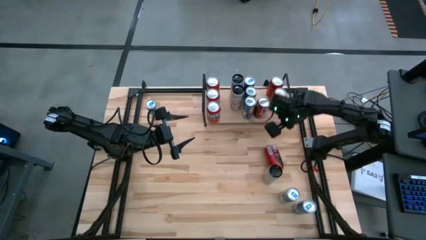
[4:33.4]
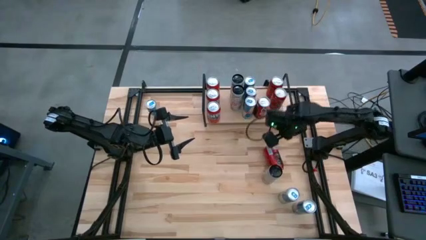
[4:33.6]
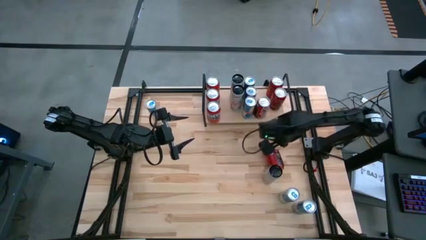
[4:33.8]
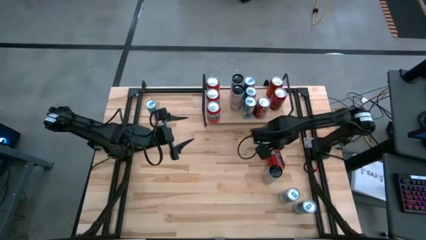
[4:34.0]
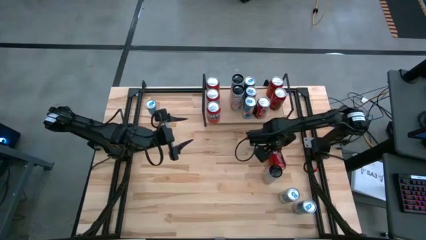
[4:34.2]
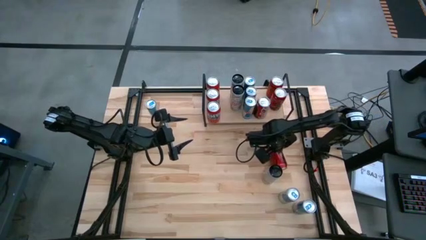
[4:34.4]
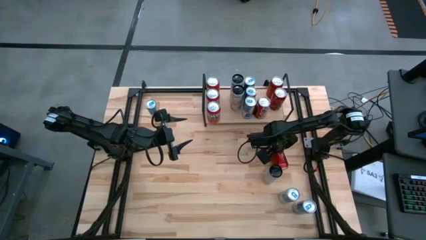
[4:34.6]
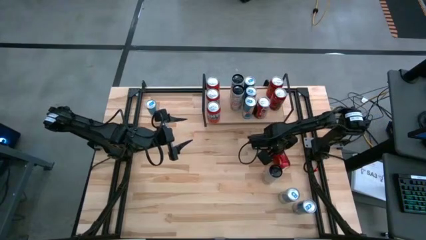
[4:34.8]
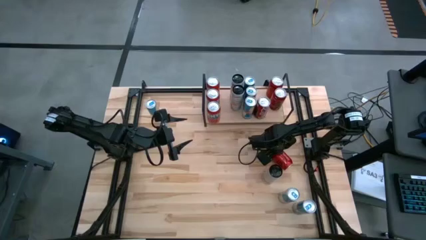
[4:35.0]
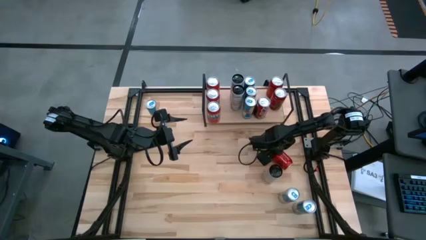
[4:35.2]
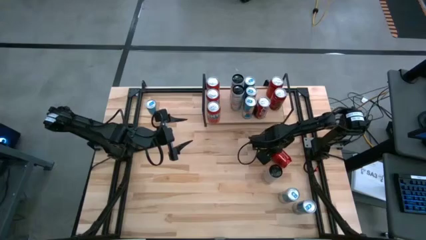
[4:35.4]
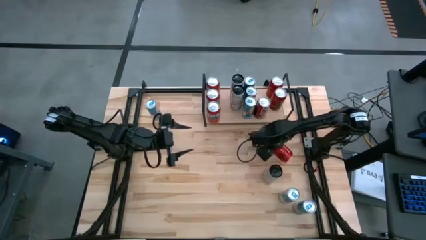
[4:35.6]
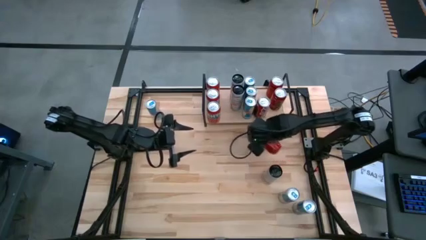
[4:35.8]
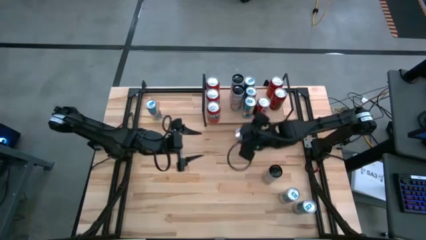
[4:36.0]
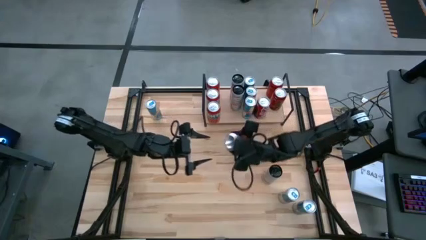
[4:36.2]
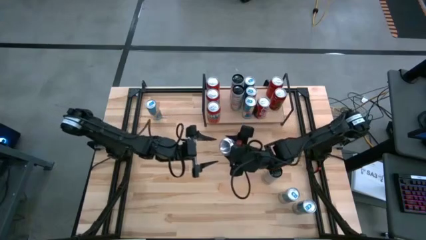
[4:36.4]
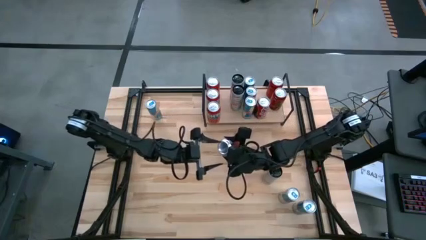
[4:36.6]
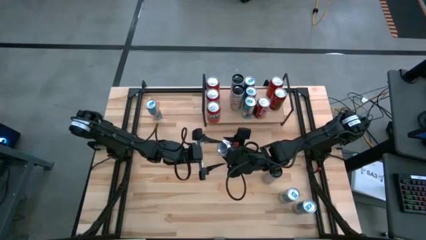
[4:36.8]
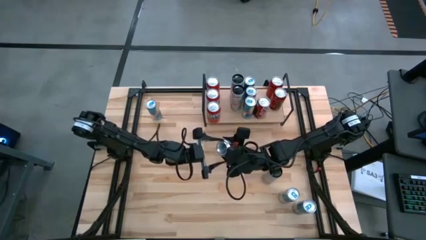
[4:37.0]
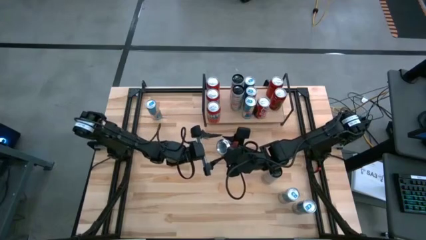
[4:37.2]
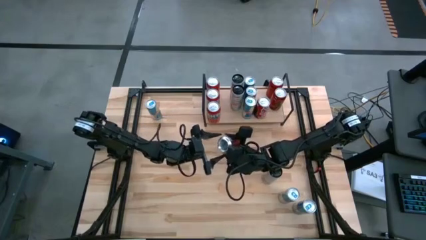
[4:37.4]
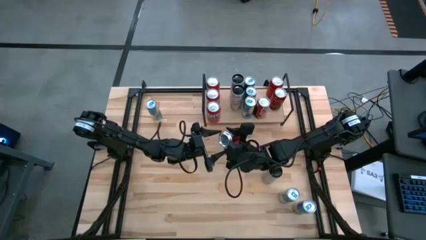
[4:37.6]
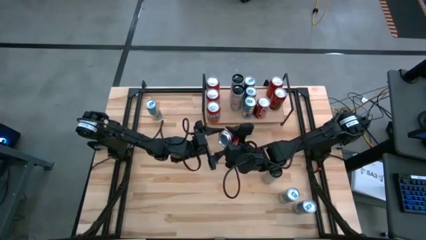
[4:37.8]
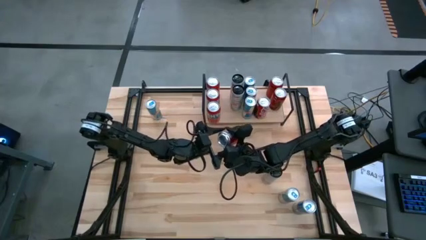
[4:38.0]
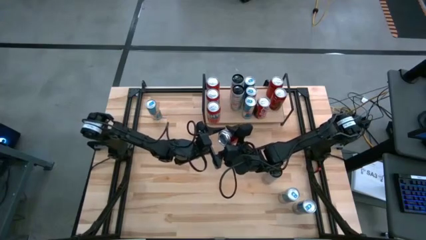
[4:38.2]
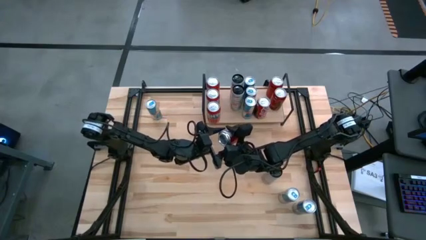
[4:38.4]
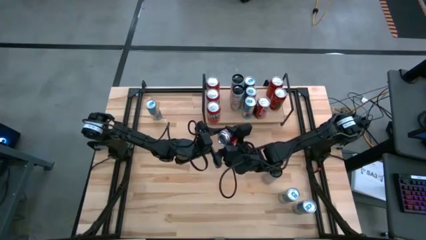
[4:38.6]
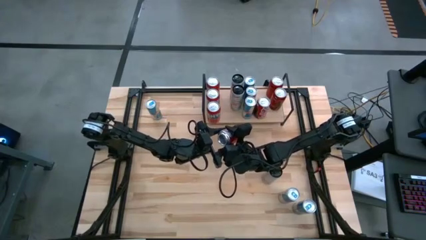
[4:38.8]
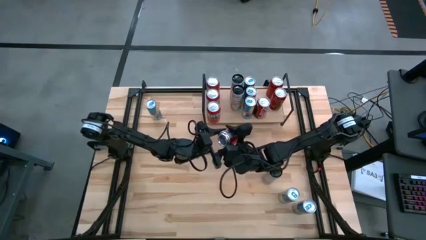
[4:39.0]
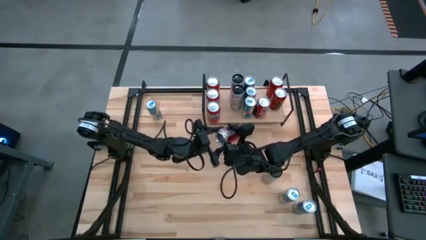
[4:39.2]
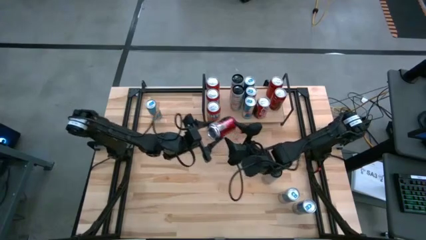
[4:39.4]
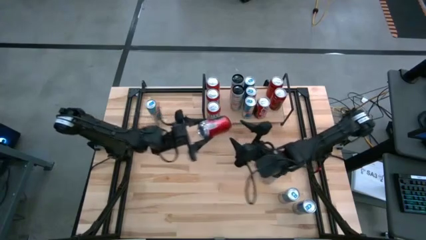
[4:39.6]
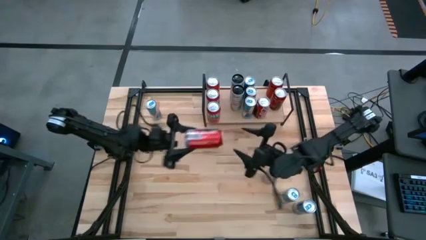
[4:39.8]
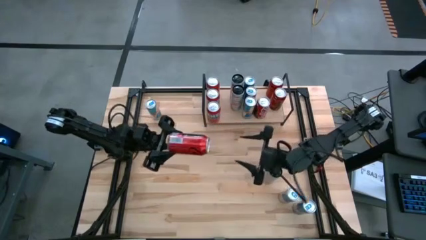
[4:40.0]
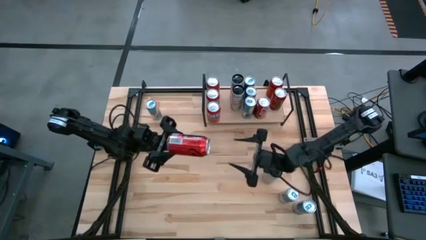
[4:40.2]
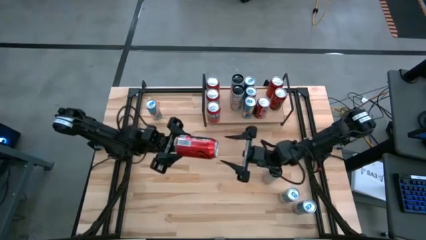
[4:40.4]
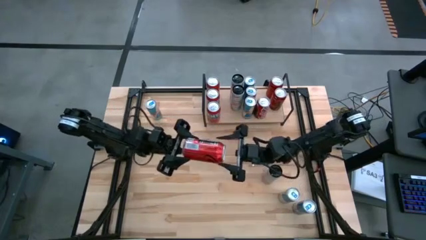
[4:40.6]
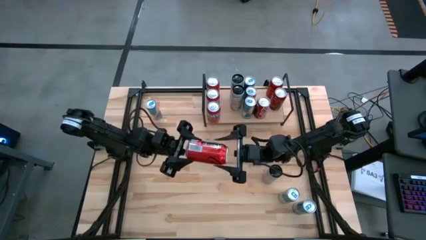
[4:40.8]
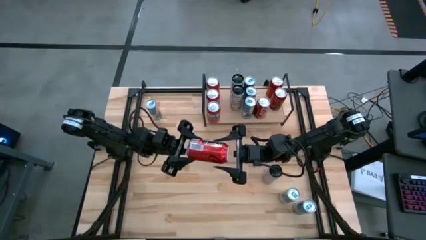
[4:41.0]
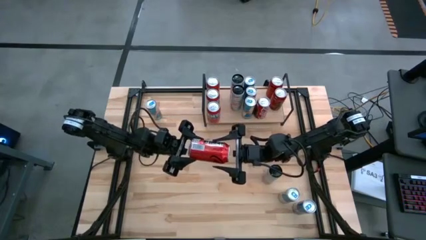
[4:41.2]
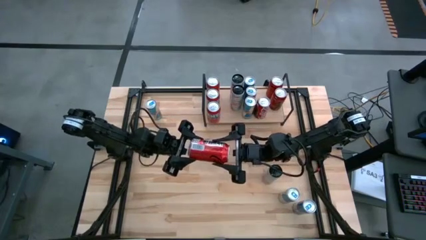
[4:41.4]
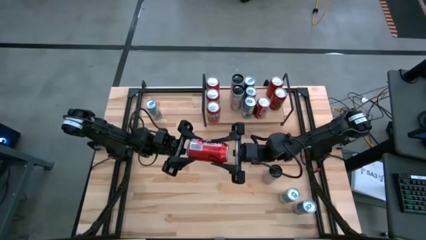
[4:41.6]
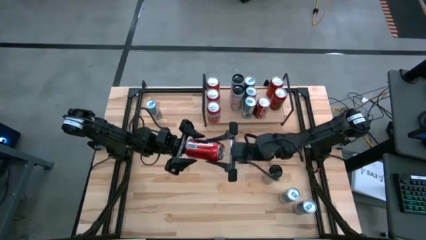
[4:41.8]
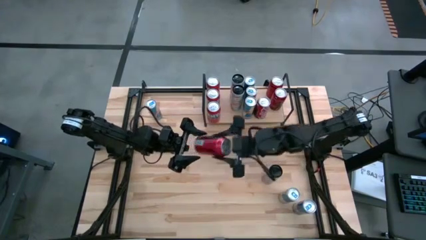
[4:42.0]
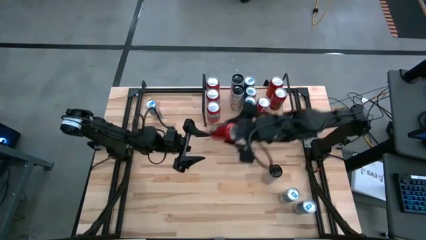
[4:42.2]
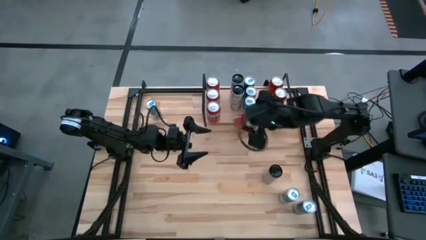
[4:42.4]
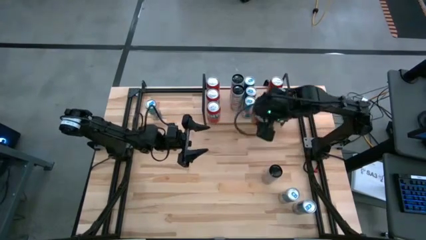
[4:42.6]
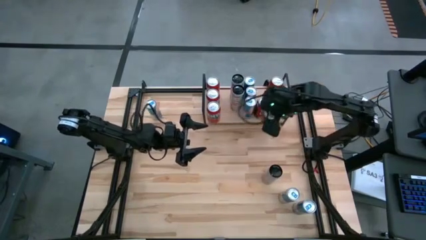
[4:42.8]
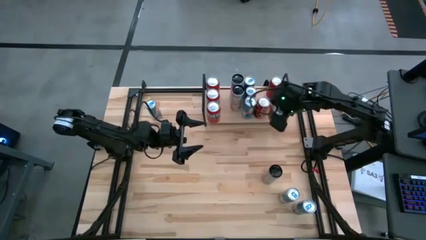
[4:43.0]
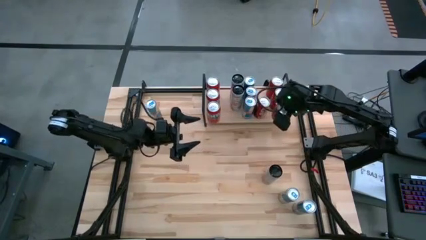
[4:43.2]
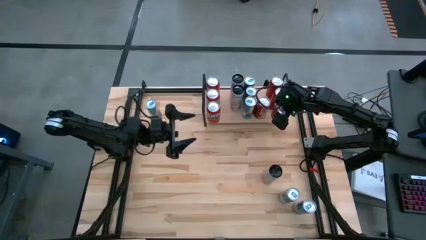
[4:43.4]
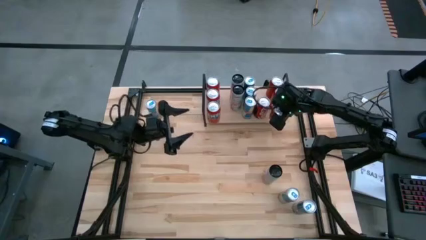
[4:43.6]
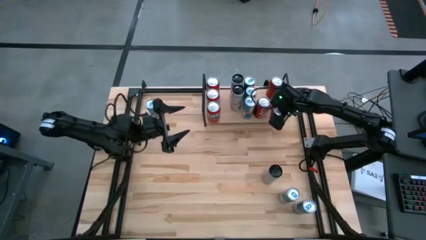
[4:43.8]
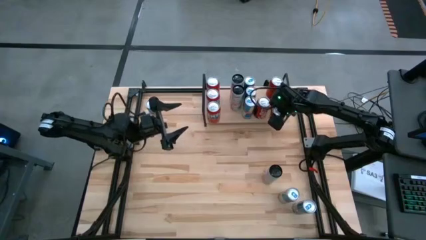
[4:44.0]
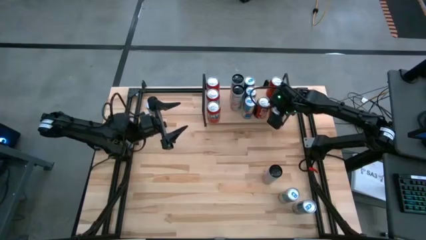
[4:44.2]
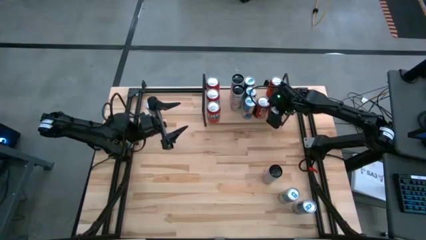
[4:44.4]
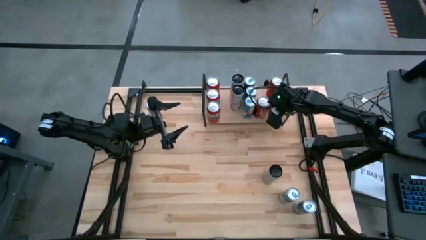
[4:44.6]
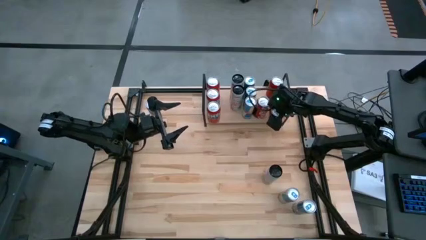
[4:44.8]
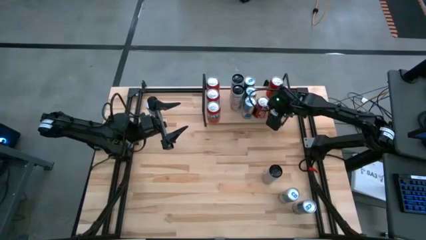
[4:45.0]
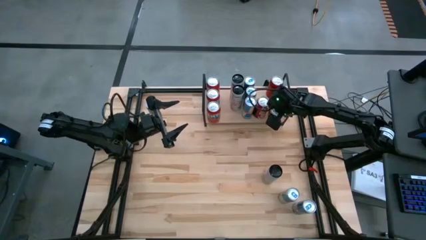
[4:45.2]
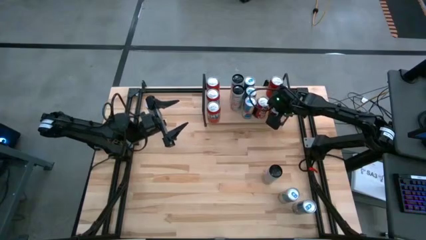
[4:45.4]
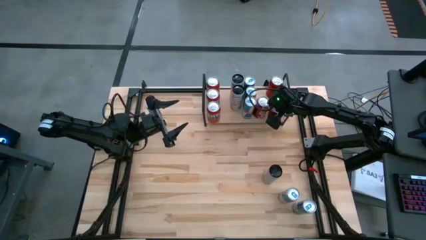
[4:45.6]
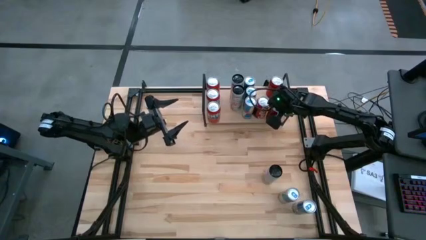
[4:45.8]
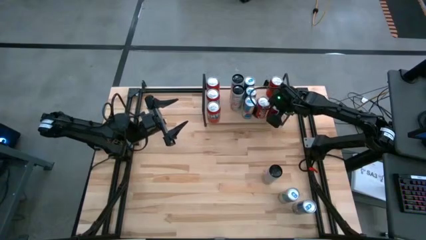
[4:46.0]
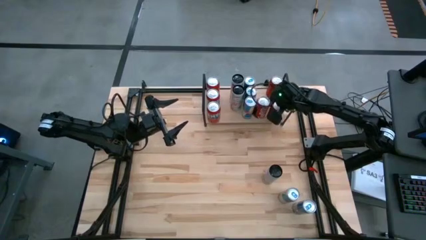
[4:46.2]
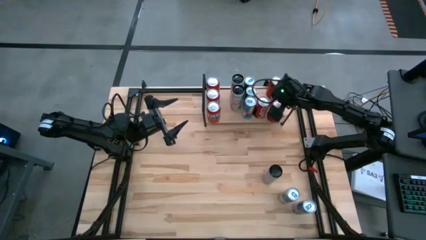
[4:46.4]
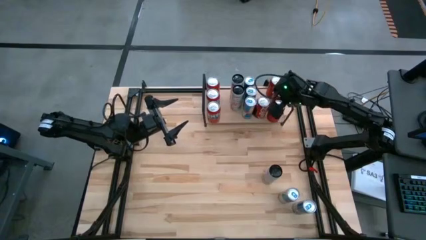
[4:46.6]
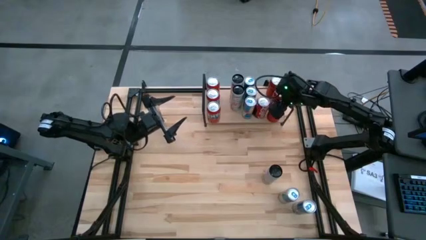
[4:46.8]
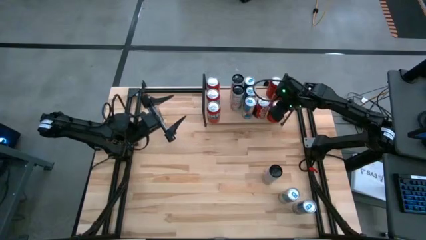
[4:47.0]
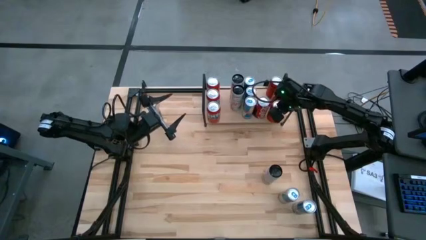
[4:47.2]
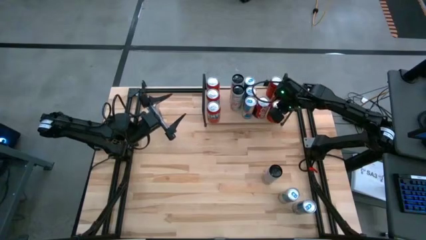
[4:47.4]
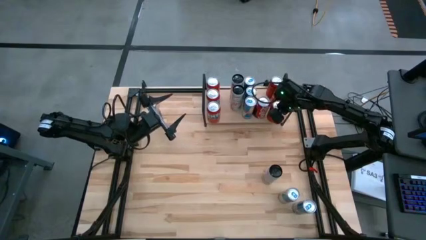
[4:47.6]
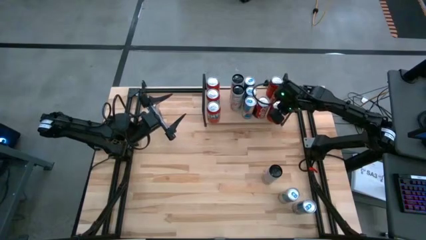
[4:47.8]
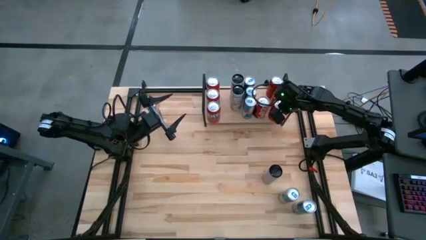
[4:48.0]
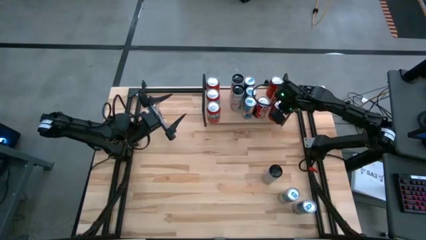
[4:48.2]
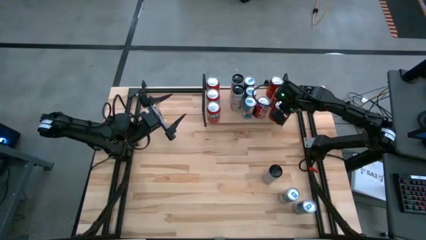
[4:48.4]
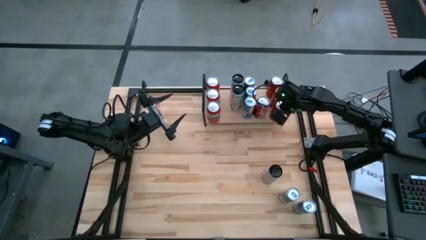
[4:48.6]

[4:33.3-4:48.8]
Task: Place canned beverage on shelf
Put the dark red soda can on the shelf

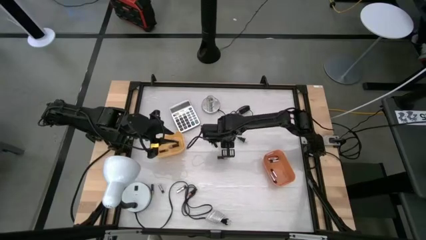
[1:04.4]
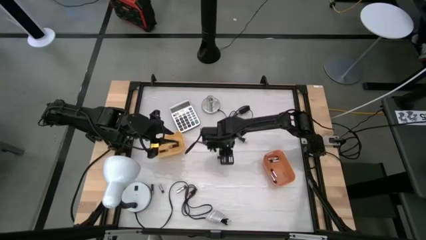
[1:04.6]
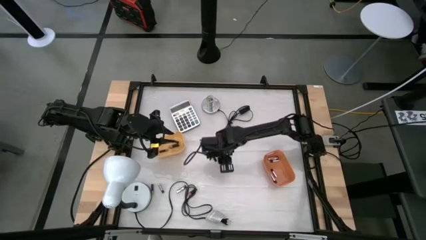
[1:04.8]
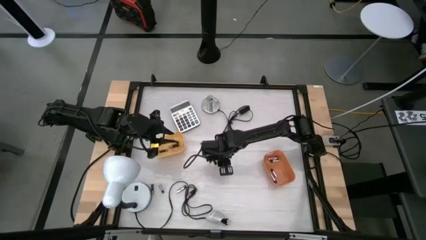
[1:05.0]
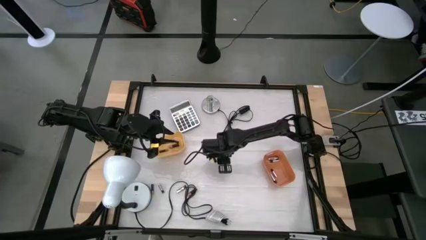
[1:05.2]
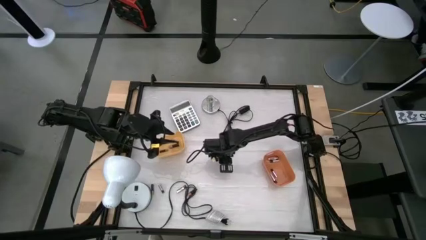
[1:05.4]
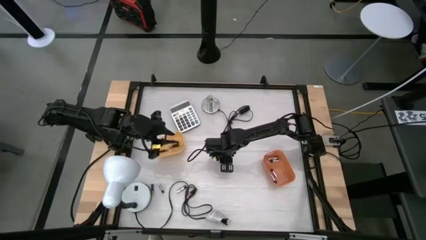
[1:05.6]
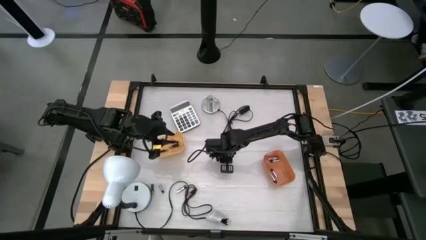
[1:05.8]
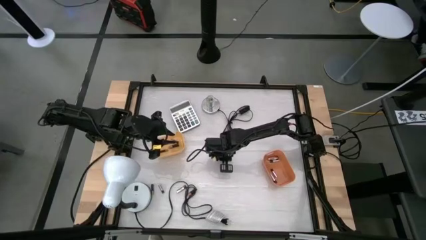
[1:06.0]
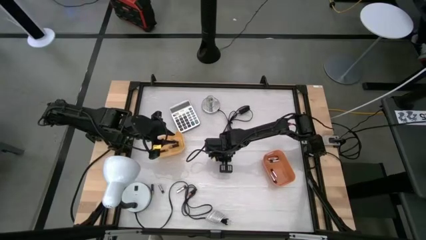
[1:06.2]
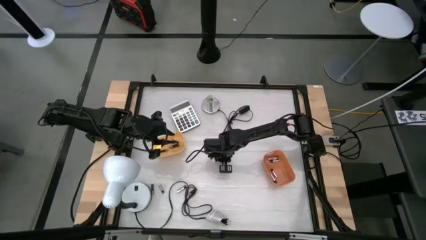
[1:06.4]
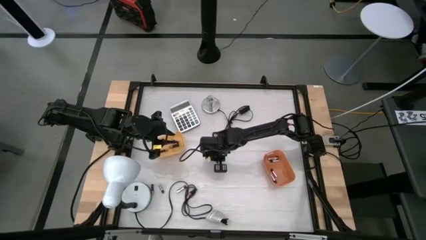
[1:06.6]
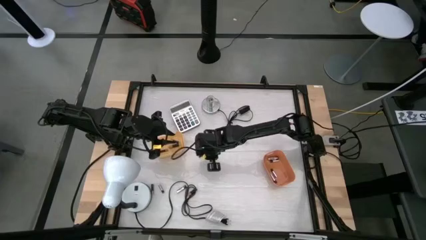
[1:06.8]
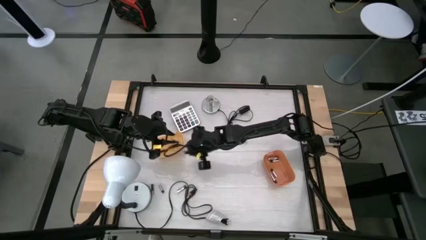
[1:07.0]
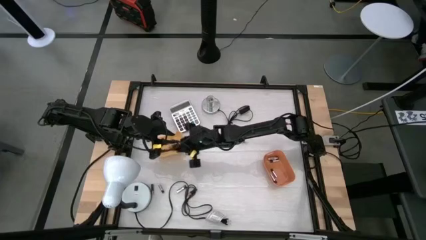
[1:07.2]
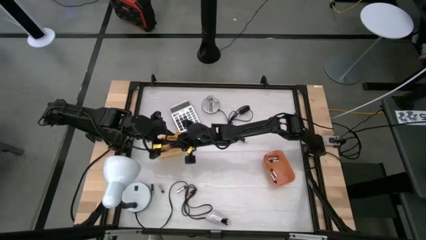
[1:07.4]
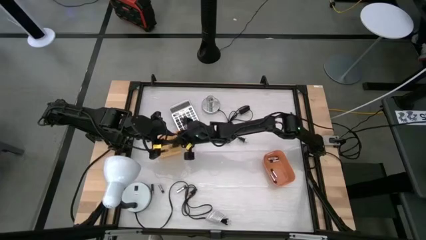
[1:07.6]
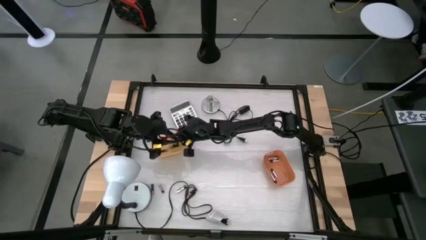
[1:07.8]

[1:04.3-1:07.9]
Task: Sort batteries
Put the black battery into the yellow bin
